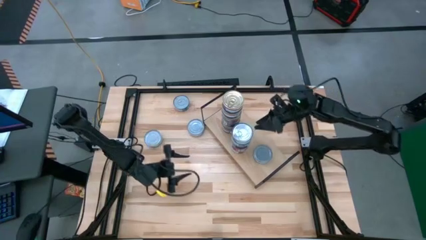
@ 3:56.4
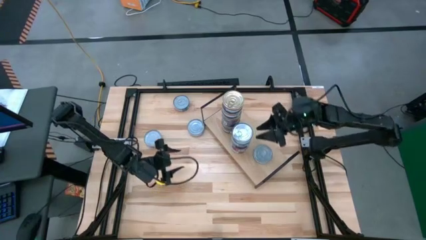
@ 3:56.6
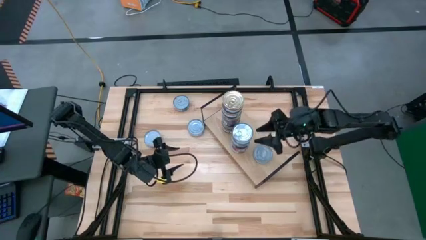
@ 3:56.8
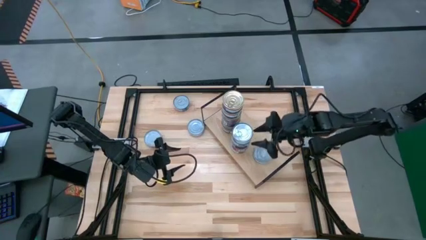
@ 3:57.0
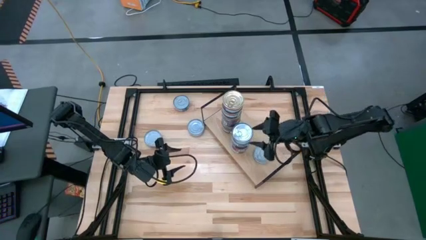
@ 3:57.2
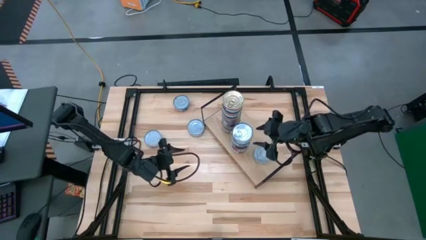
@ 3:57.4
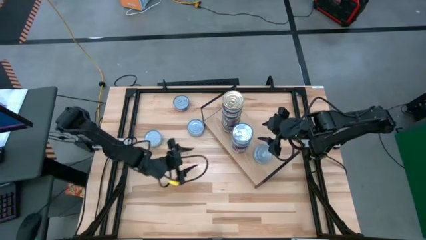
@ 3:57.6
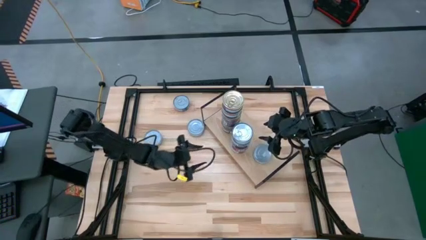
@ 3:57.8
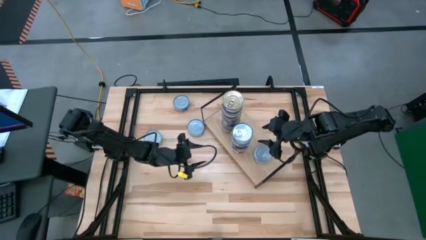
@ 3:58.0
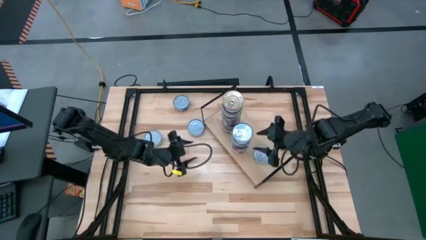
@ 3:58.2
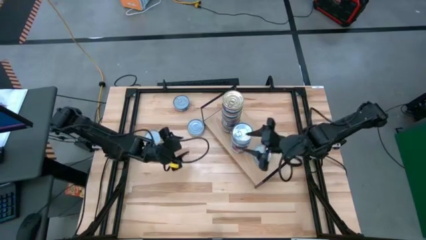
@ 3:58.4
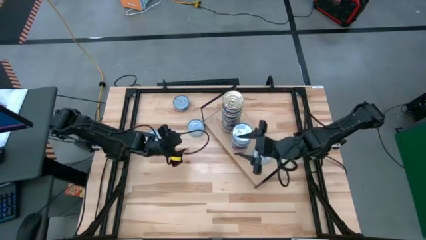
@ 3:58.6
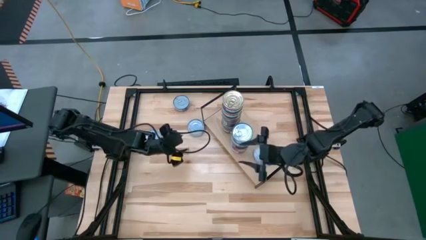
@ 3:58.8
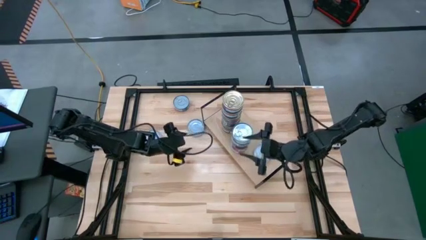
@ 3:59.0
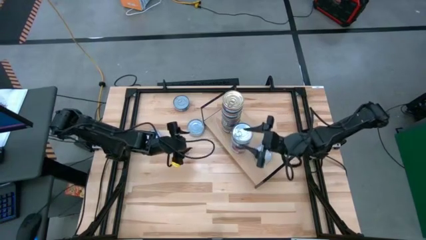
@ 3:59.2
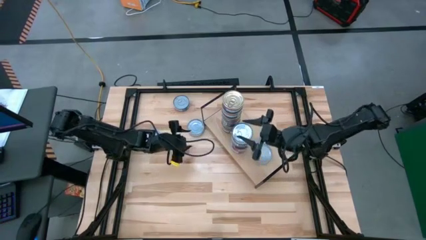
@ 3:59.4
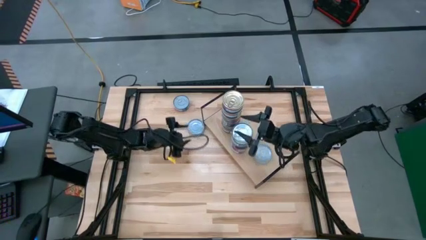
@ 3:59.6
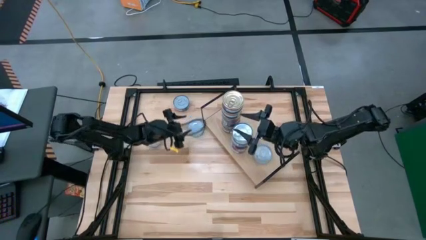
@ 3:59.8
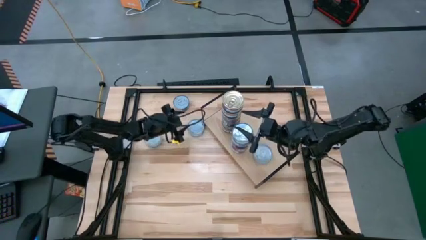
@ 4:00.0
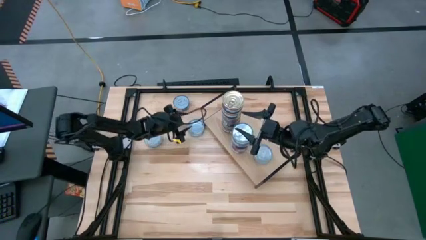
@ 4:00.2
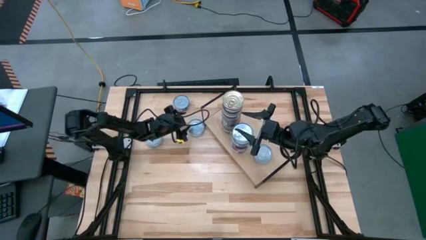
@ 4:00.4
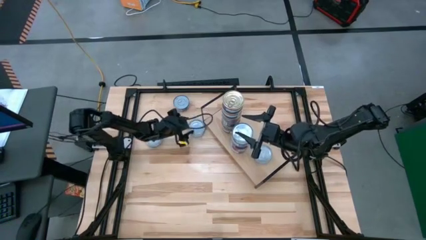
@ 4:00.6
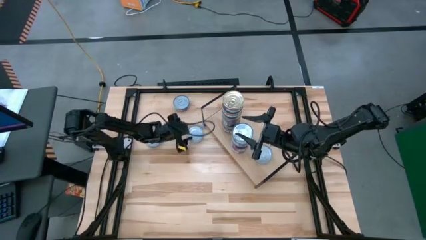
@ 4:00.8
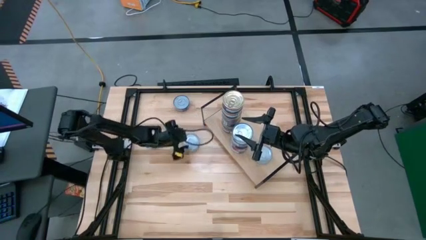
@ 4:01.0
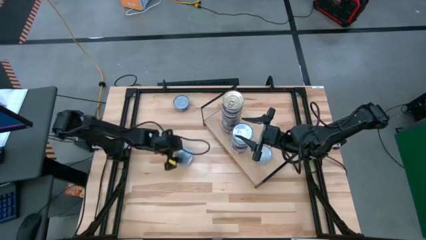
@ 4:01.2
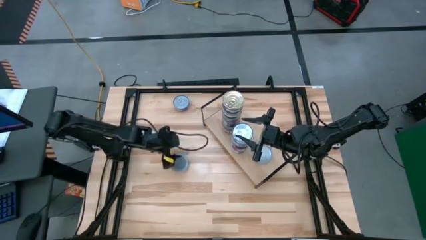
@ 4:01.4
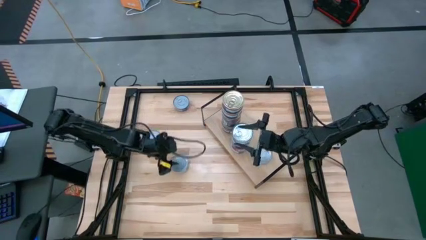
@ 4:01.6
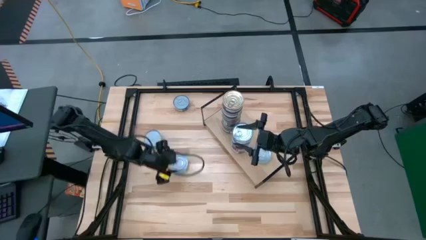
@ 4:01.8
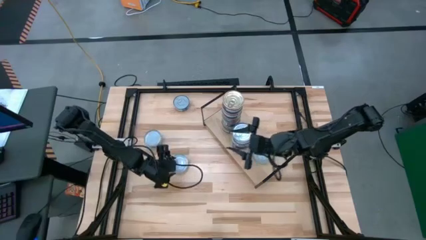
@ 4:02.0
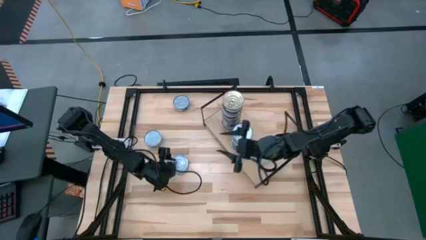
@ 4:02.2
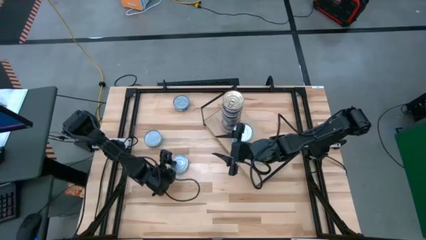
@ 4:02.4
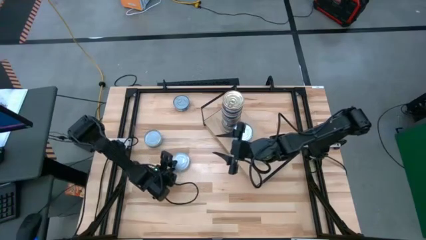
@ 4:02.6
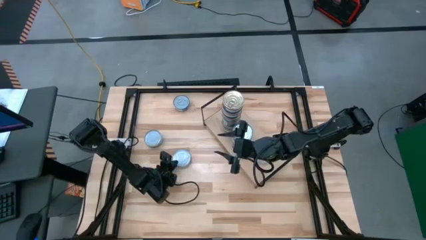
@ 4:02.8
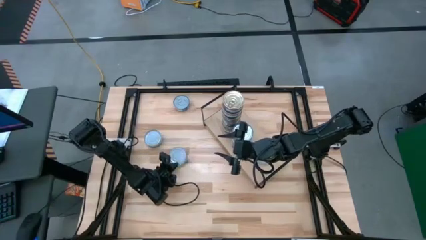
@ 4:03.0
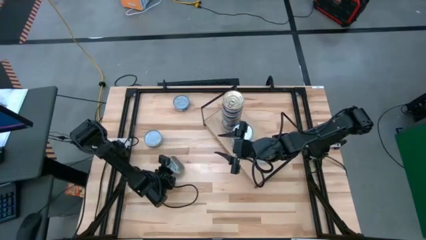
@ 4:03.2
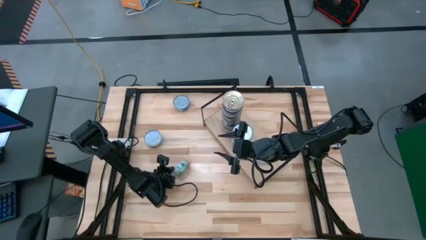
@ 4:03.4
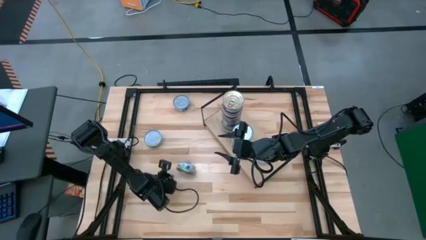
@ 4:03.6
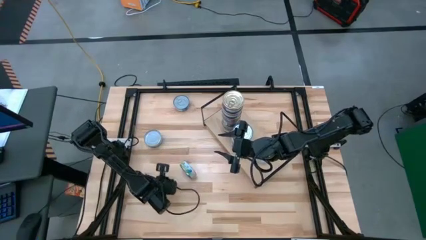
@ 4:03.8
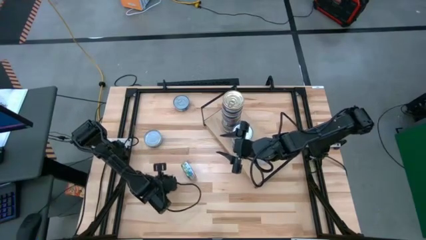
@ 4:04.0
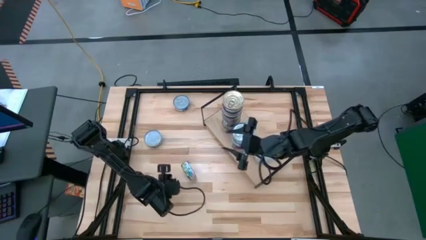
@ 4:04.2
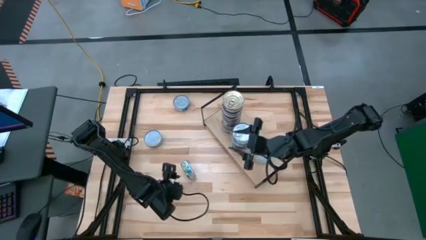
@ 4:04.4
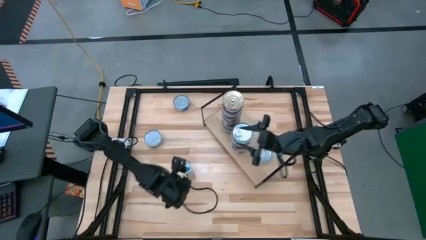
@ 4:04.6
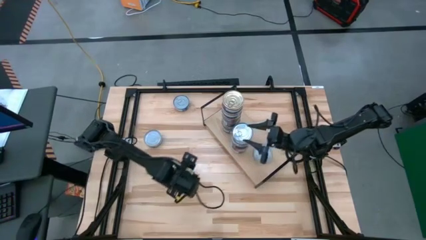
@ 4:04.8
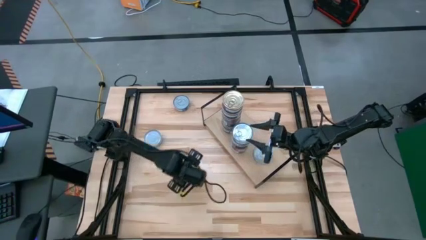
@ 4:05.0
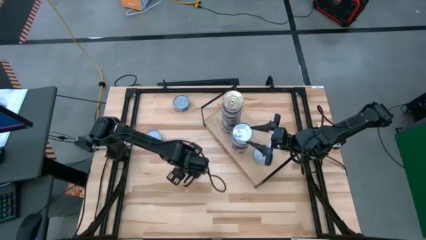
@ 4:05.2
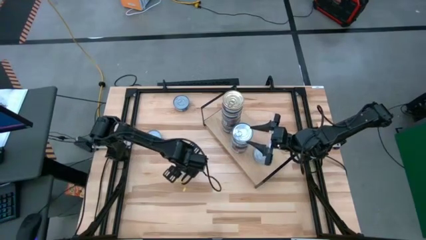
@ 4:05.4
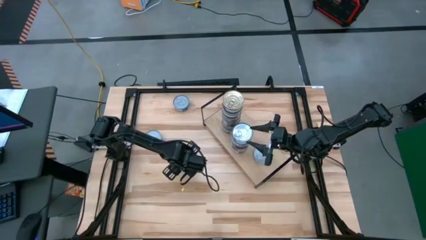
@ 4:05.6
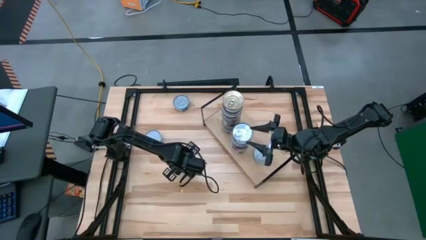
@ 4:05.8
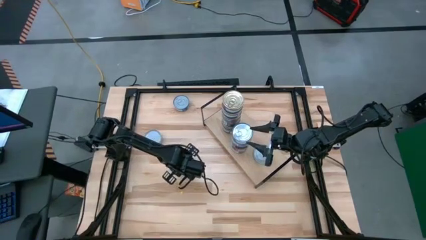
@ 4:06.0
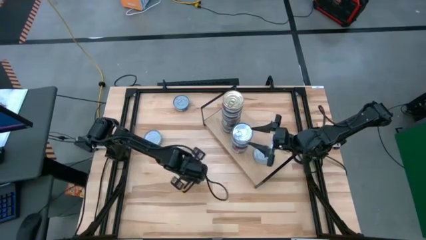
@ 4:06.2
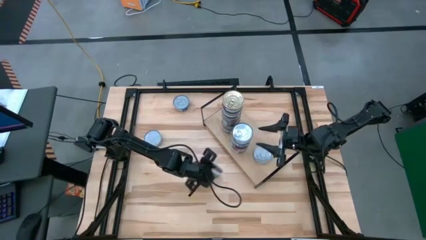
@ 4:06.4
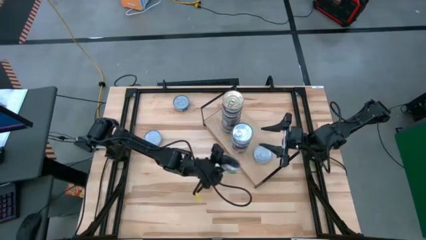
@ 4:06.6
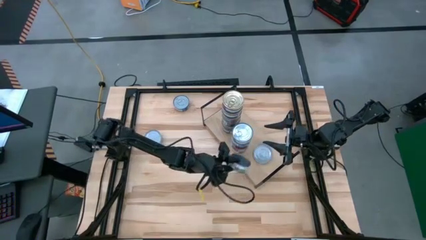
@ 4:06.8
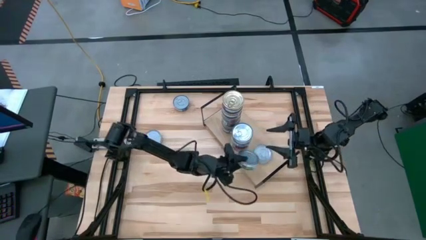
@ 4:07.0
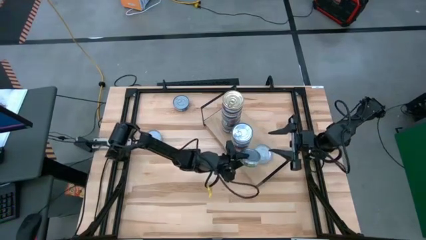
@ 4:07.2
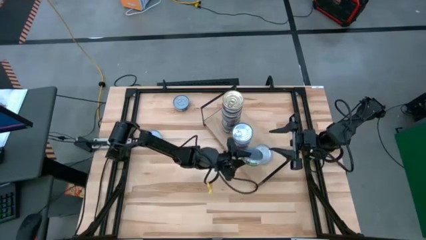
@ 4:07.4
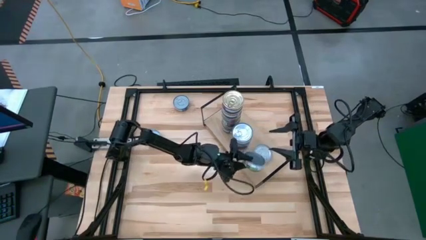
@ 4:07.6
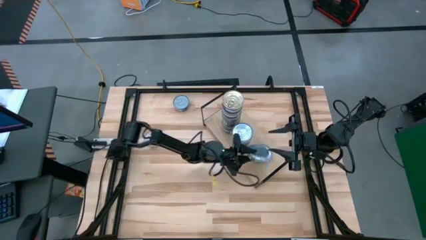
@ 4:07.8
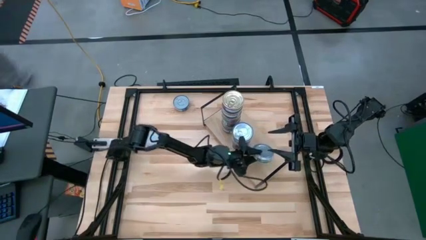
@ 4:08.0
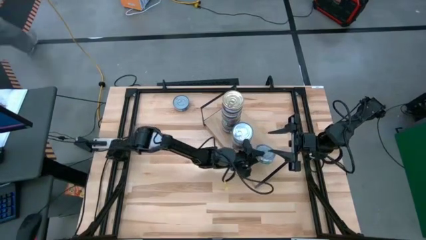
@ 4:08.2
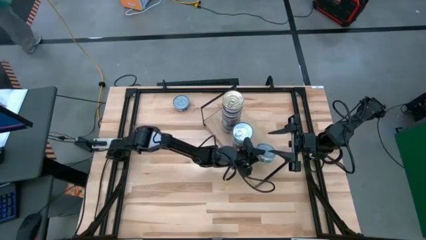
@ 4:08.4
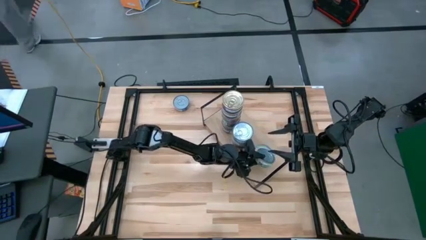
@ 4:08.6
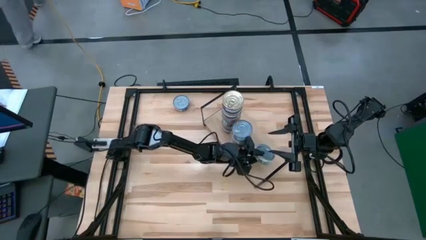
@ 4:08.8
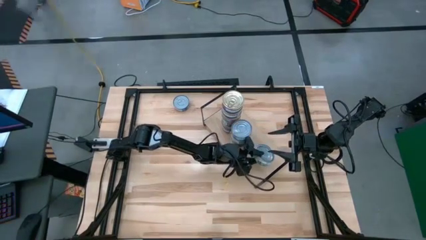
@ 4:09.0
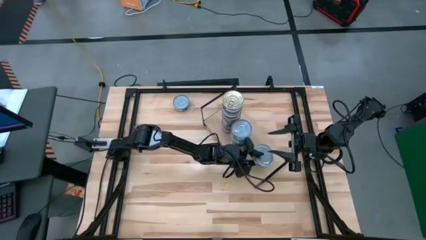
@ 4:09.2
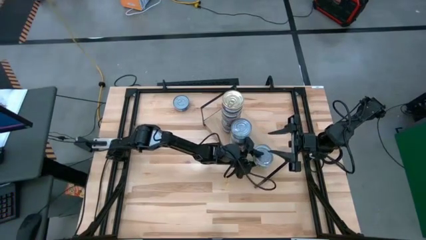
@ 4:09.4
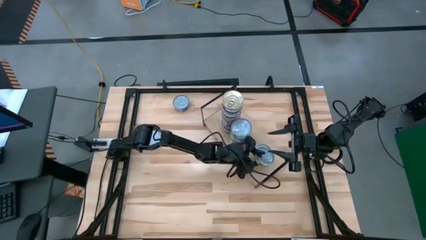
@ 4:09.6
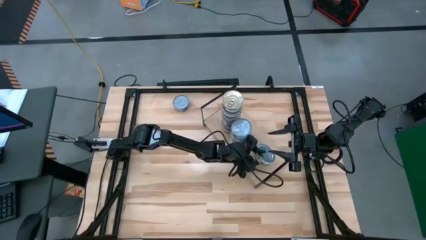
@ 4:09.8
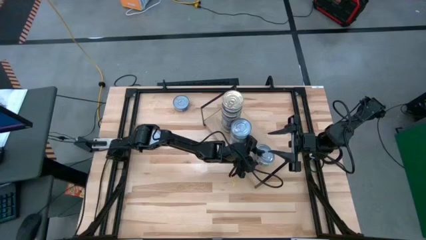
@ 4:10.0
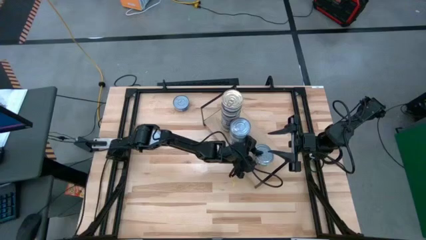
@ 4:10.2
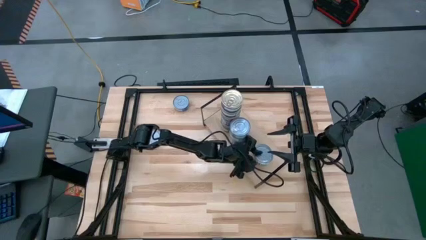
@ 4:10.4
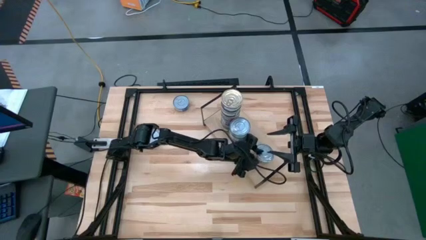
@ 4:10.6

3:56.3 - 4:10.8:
Task: Stack canned seafood by type on shelf
Stack the green tuna can on top of the green tuna can on the shelf
